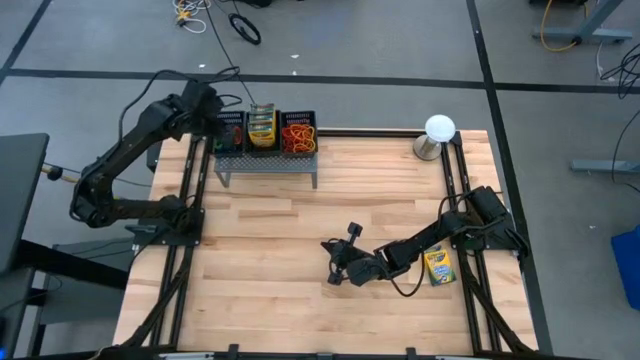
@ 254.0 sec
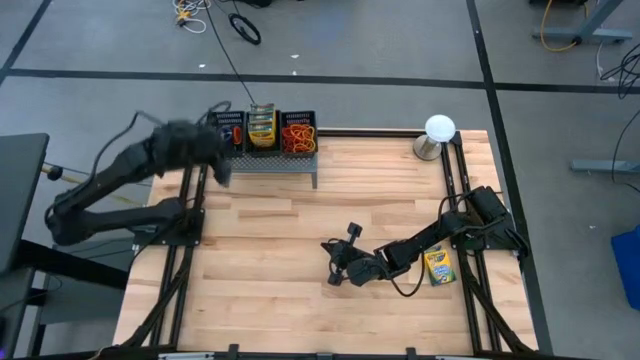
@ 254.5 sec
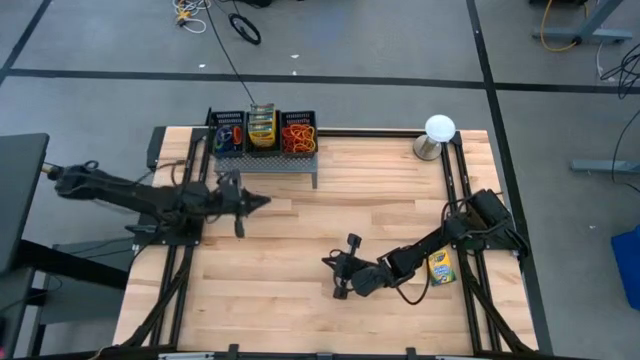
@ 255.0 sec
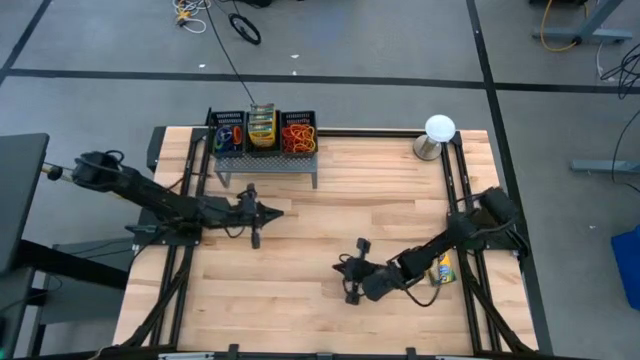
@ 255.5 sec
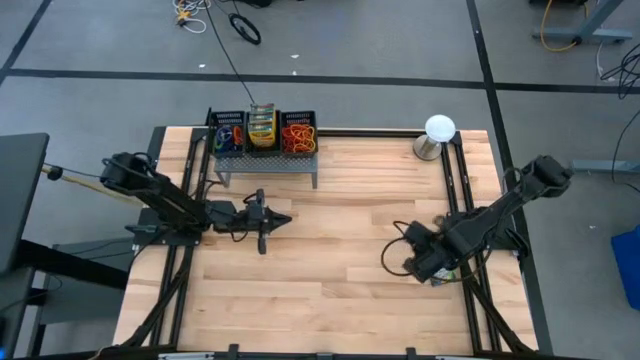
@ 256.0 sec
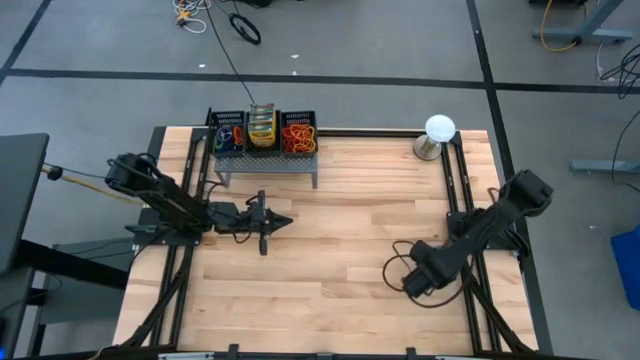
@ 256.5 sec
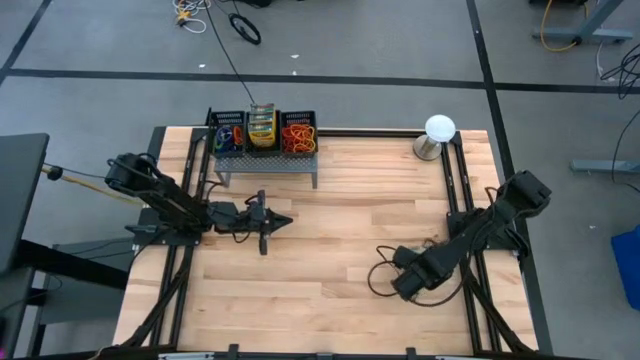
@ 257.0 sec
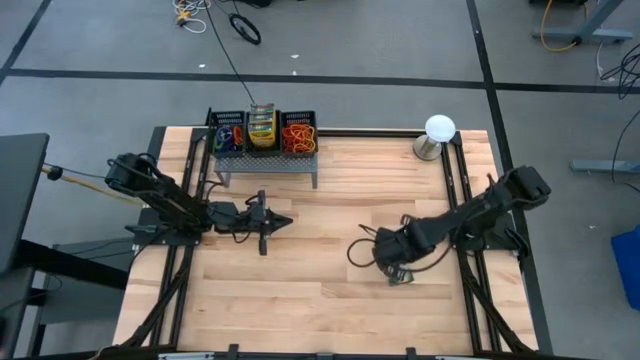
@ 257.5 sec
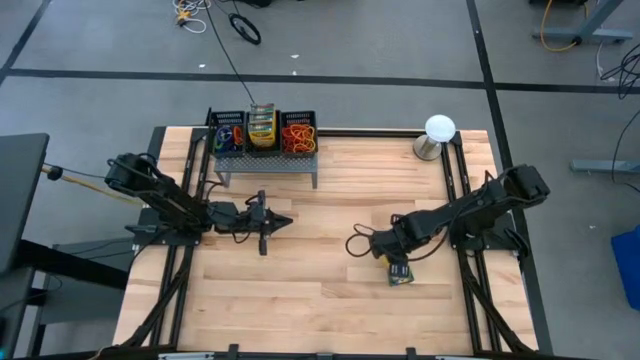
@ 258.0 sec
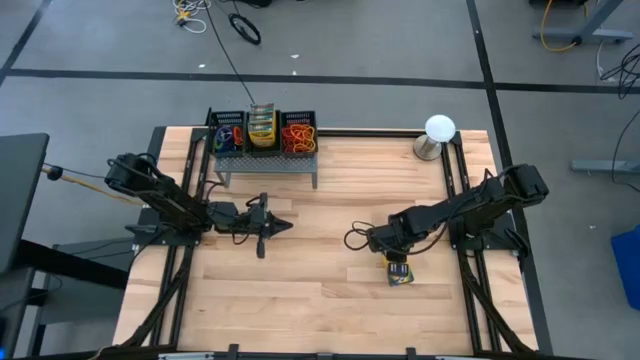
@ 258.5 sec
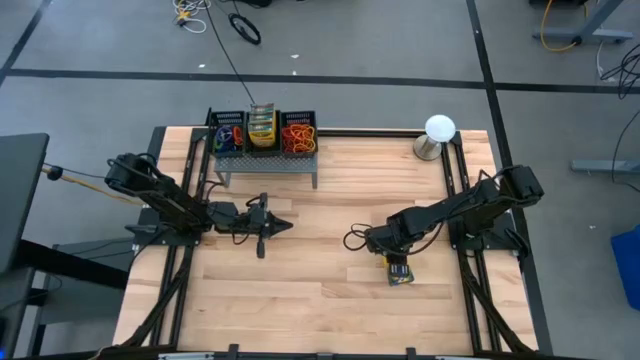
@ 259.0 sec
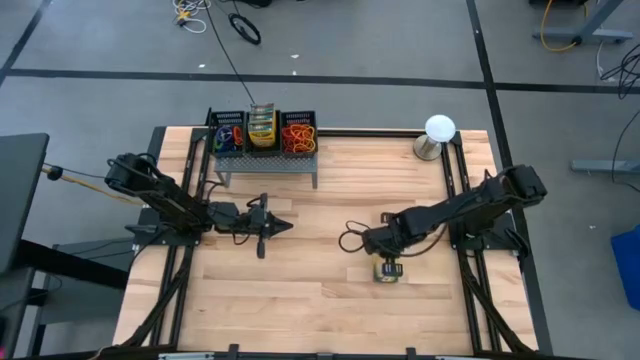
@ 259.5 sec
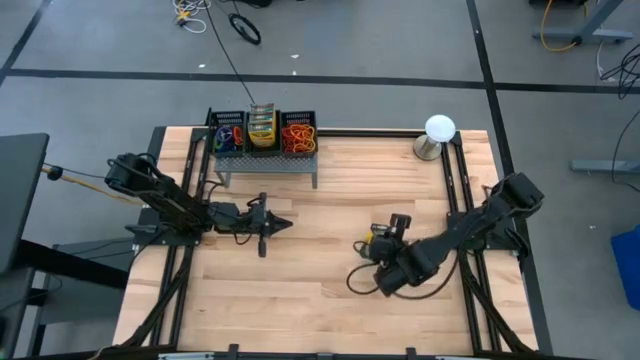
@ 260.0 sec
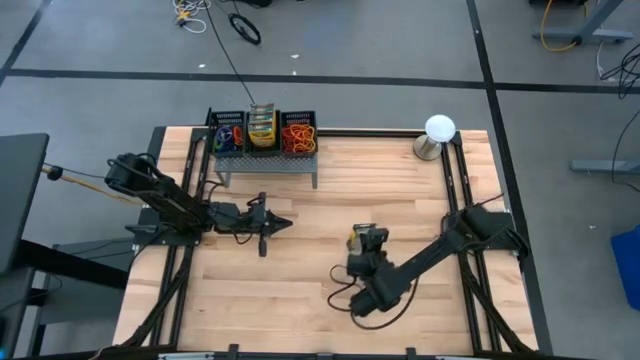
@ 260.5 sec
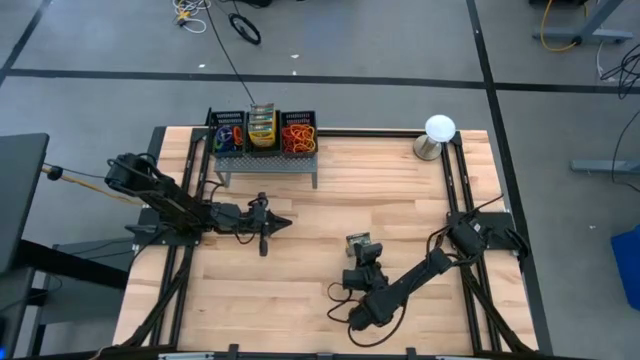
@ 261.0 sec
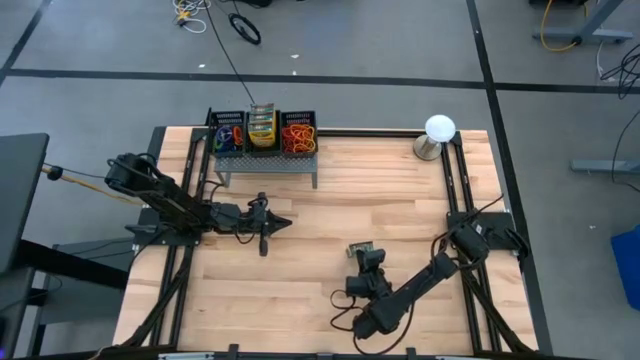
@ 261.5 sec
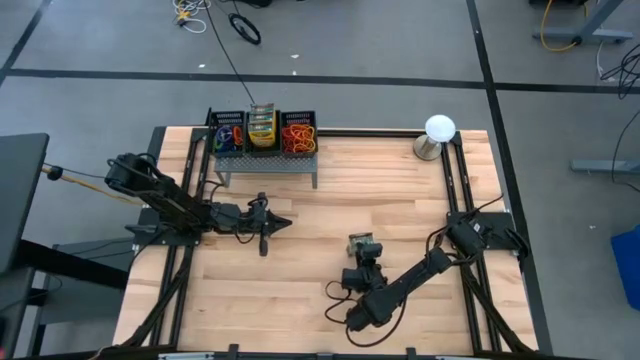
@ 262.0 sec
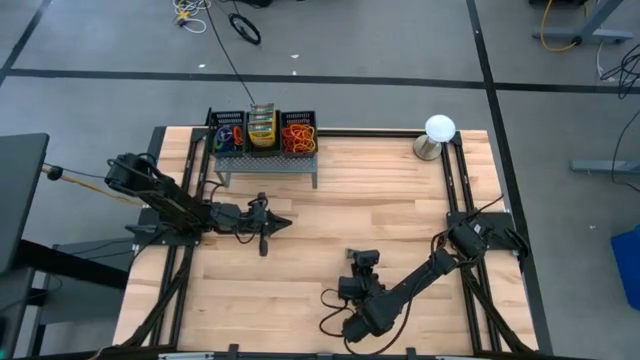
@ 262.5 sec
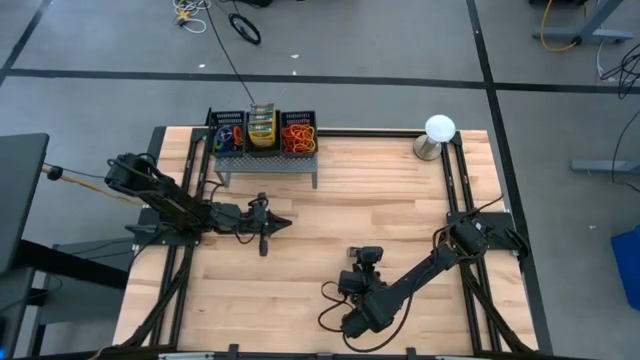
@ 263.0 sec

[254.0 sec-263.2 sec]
Task: Pick & Place Office Desk Supplies
Put the yellow crayon box into the middle black bin

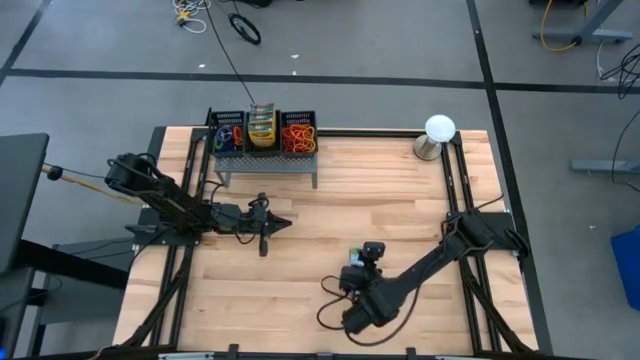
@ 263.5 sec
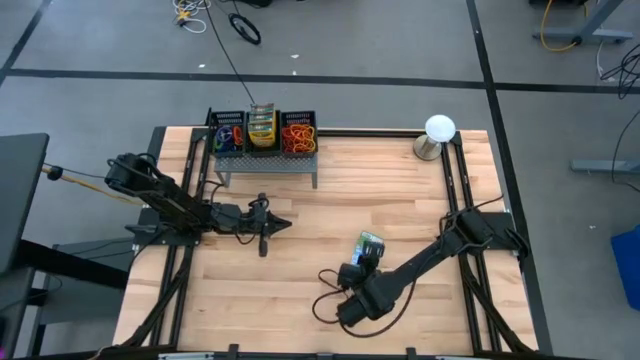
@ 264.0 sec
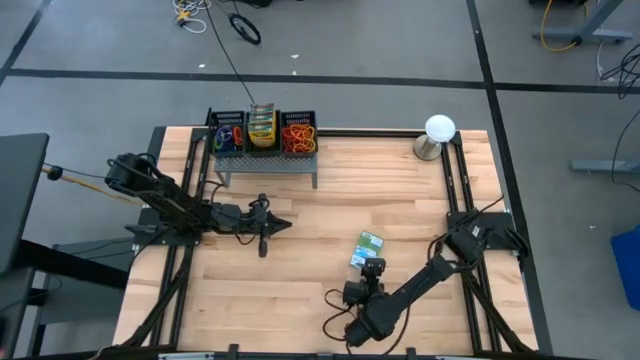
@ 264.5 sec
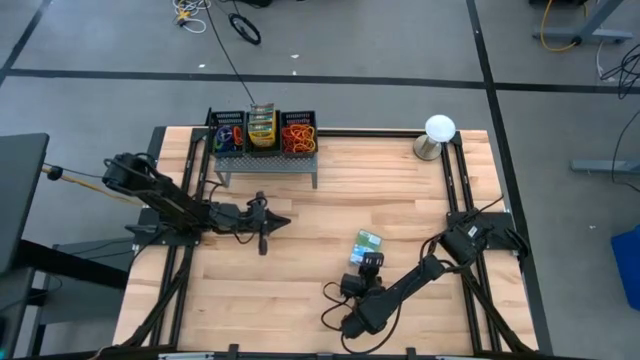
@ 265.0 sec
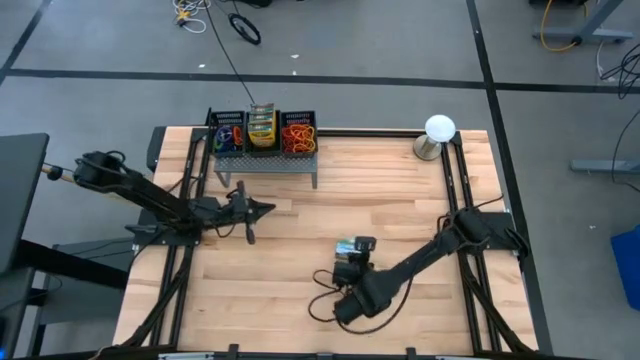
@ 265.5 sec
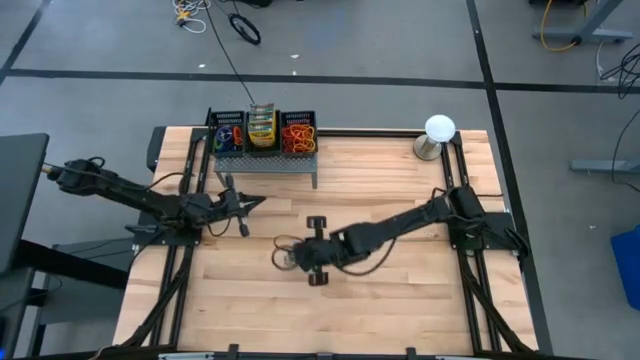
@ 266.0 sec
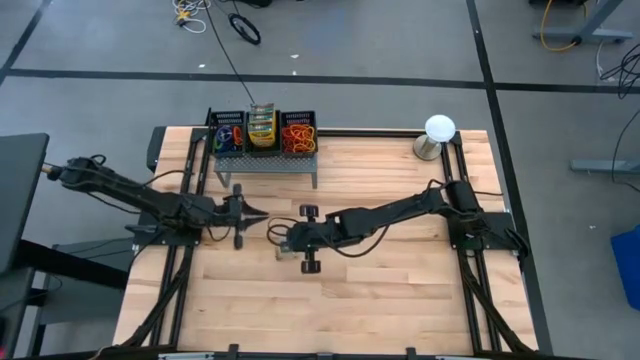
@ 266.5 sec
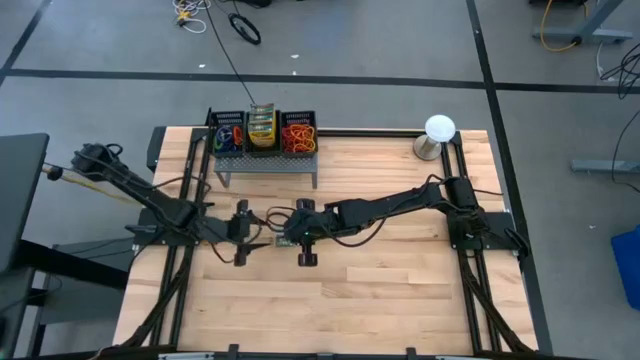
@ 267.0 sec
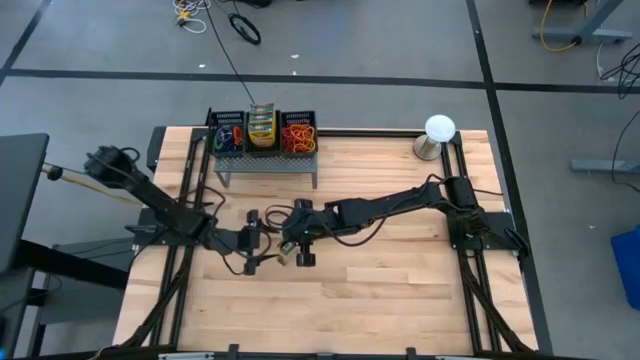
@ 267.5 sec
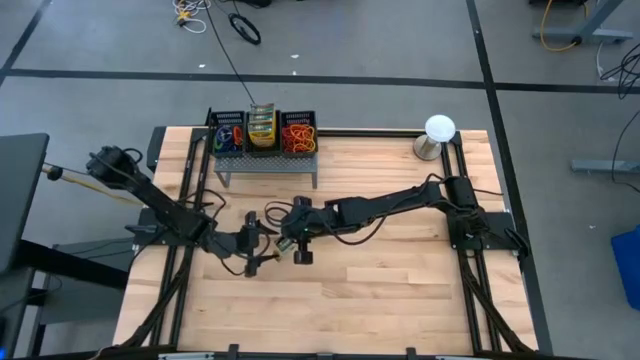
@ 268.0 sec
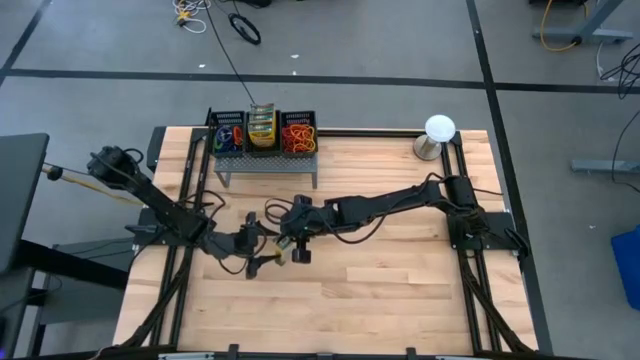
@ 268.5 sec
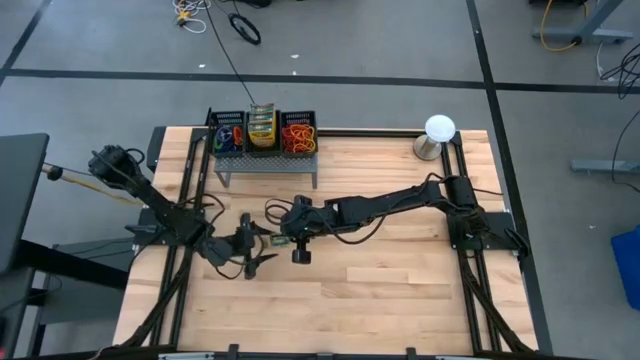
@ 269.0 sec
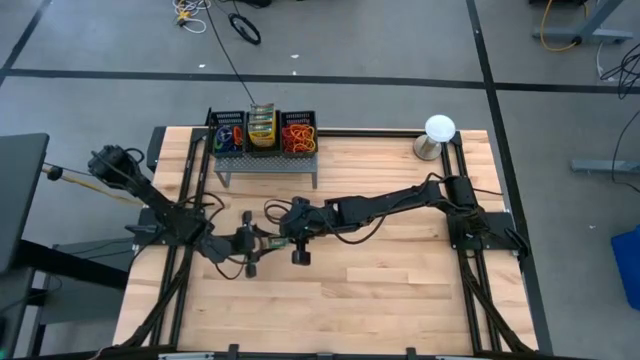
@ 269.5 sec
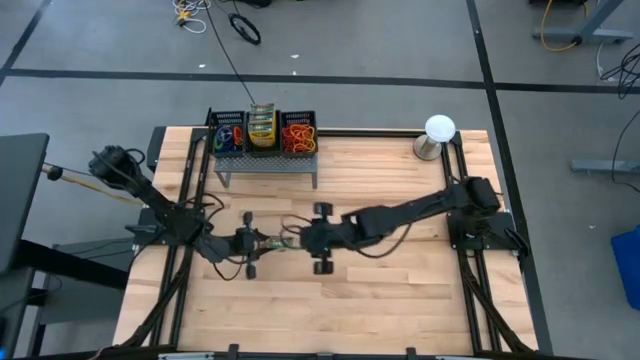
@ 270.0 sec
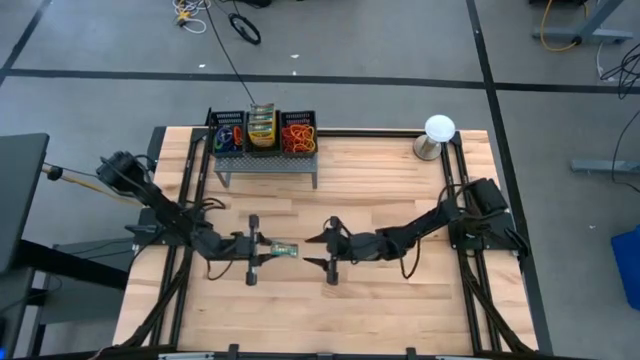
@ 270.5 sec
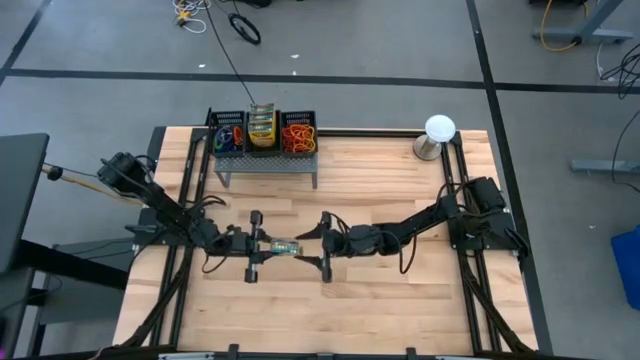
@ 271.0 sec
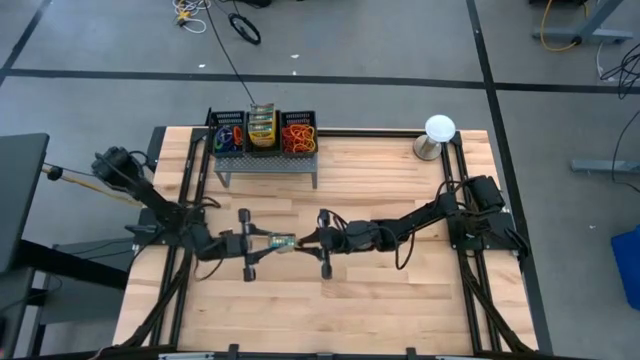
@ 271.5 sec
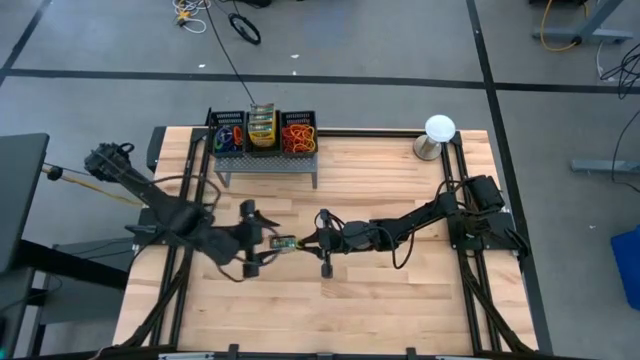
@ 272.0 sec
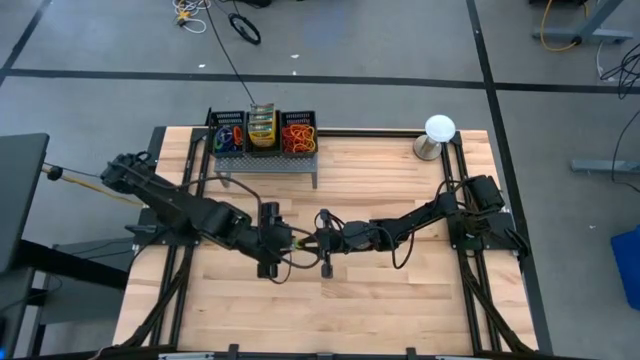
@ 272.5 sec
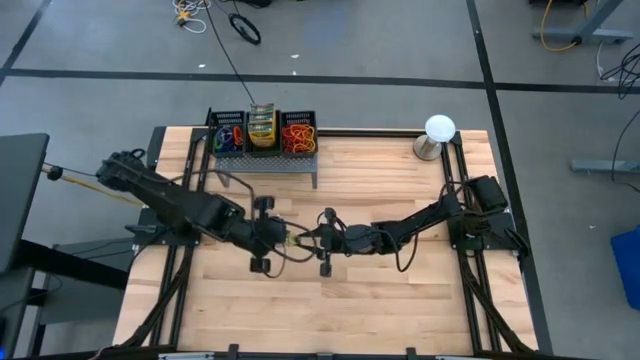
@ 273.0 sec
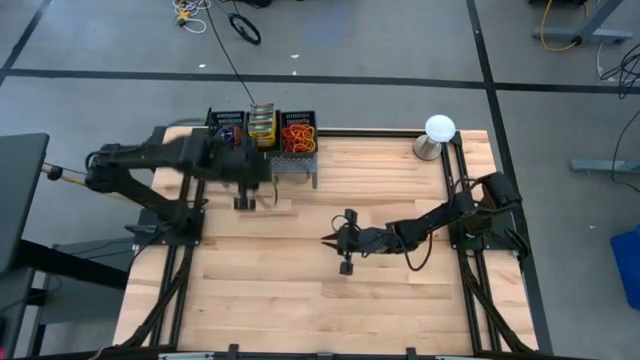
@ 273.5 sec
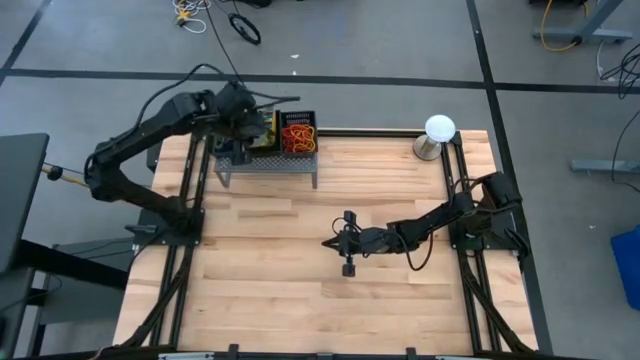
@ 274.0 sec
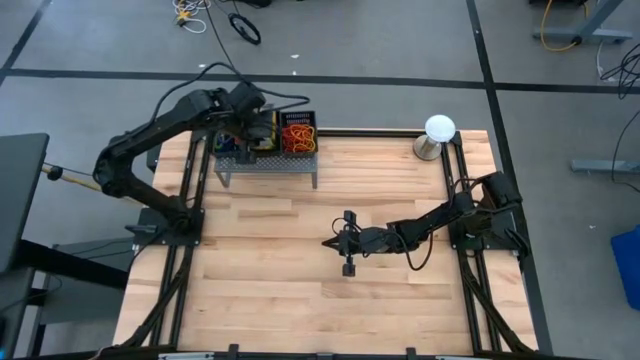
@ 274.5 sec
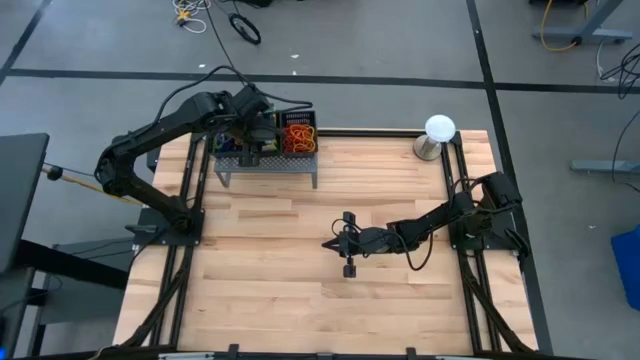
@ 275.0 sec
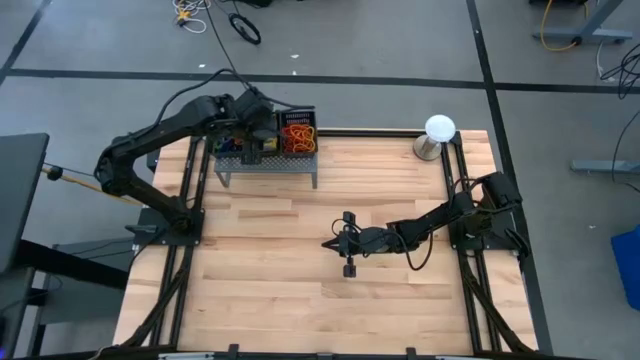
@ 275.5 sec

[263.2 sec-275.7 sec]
Put the yellow crayon box into the middle black bin
